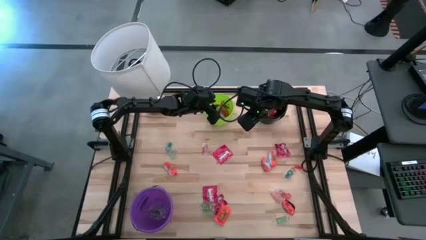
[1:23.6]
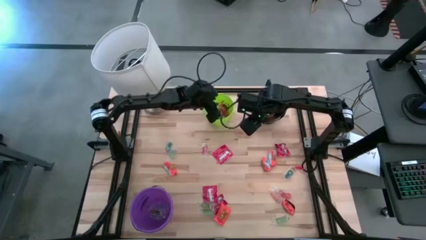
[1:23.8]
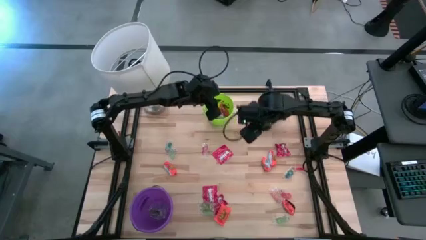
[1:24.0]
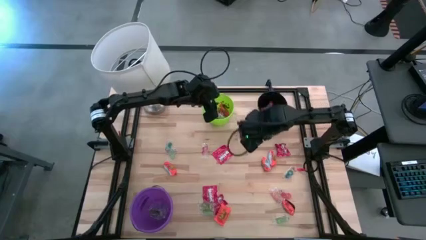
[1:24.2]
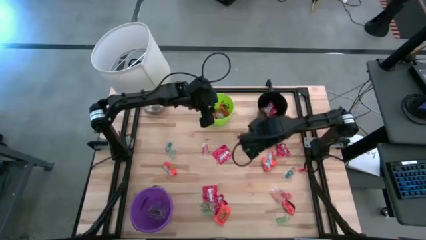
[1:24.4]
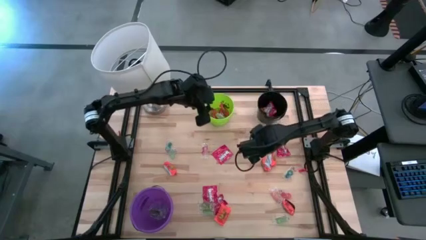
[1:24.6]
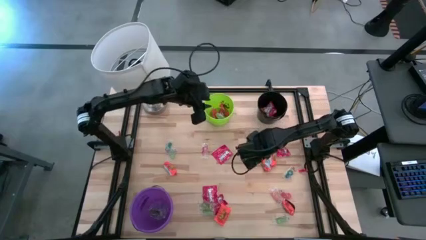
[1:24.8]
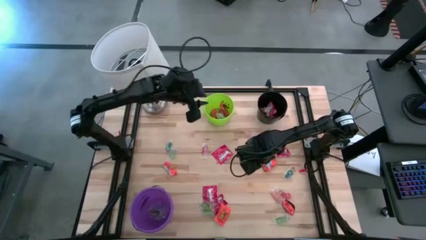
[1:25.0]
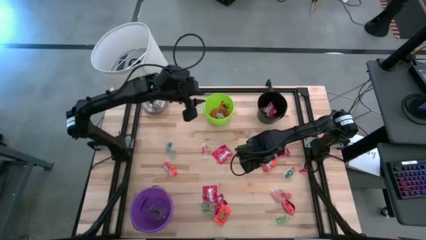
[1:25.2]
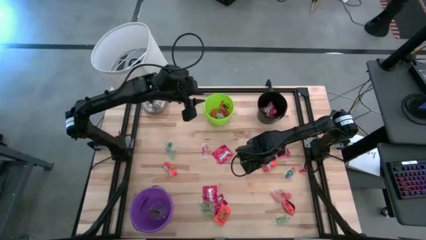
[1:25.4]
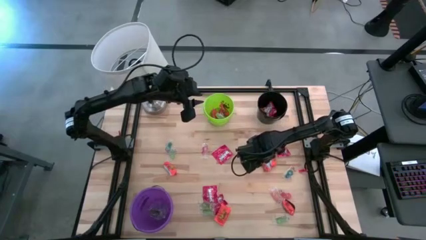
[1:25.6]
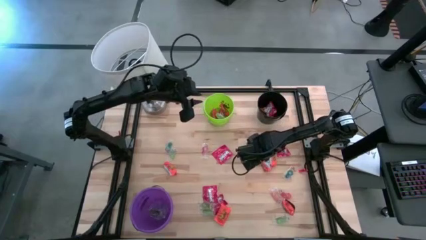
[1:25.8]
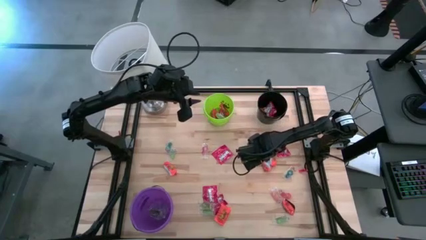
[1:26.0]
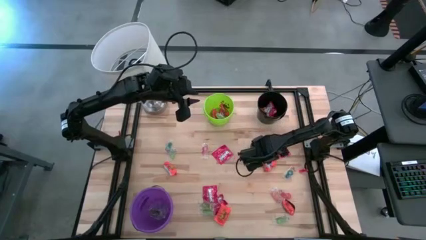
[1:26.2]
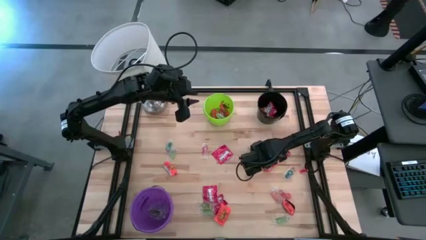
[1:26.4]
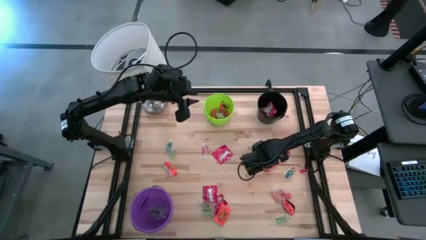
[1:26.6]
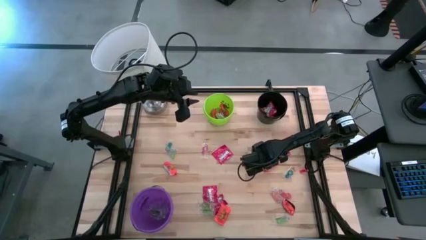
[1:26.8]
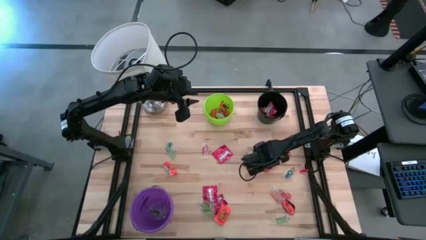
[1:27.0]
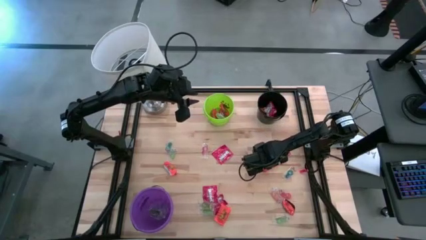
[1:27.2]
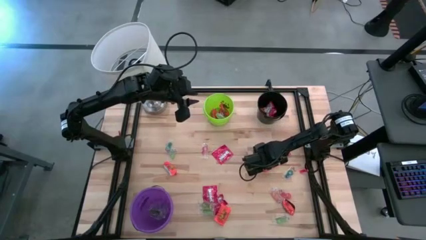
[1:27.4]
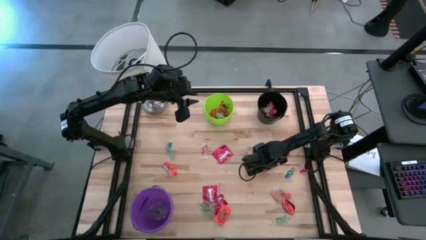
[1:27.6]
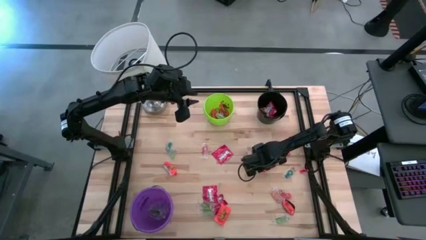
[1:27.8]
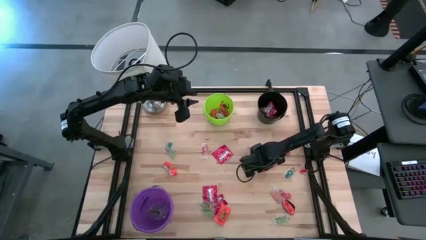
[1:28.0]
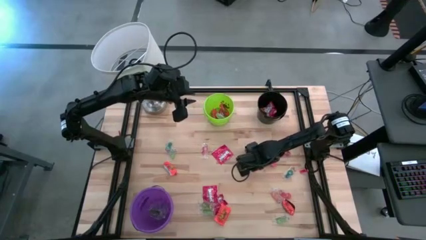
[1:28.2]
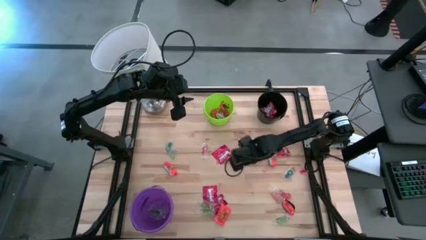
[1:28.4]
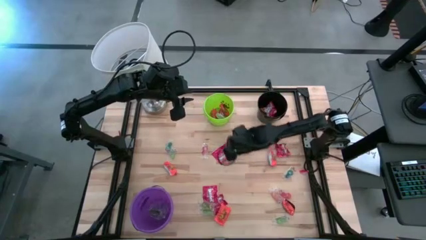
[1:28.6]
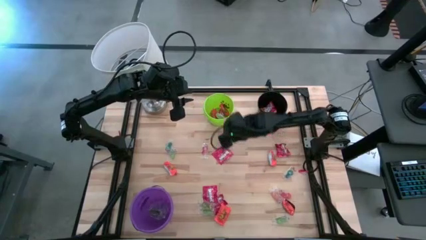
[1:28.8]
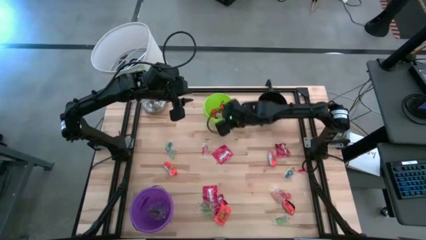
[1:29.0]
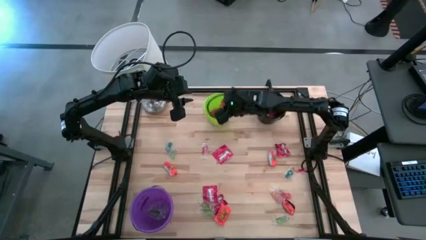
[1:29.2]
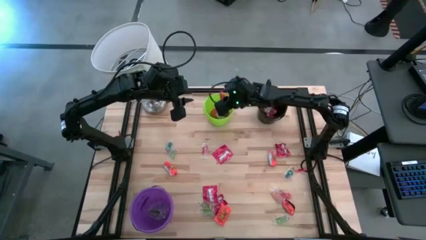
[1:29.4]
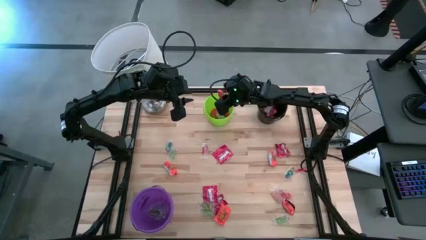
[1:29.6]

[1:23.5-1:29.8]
Task: Sort candy
Put the orange chocolate into the green bucket

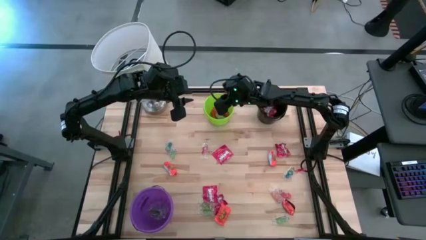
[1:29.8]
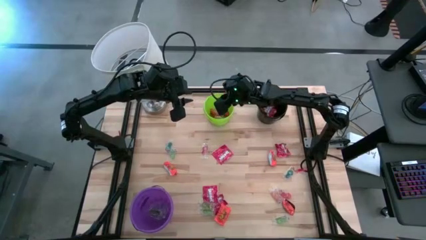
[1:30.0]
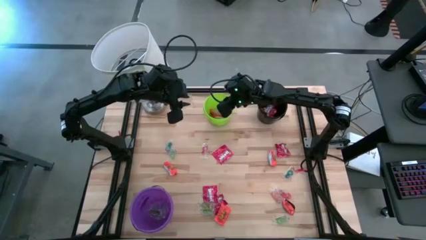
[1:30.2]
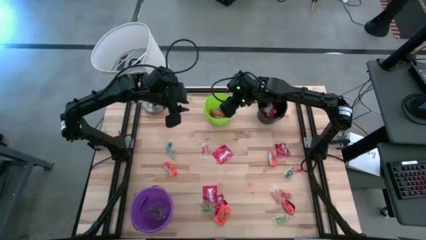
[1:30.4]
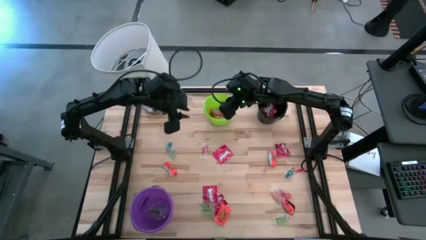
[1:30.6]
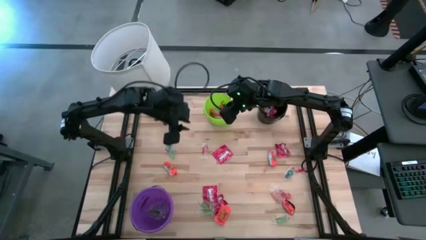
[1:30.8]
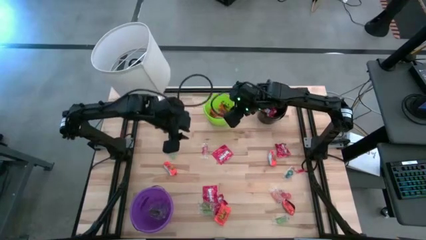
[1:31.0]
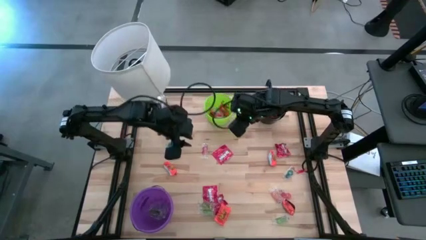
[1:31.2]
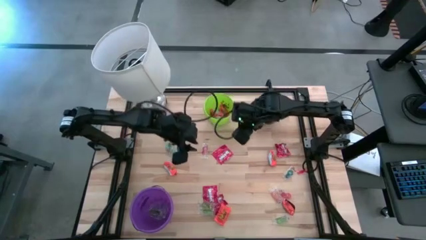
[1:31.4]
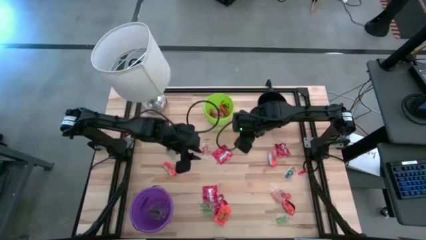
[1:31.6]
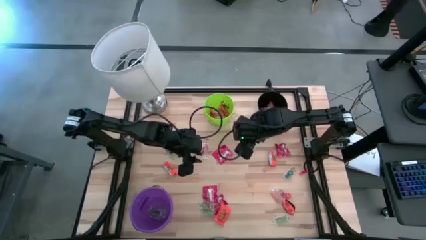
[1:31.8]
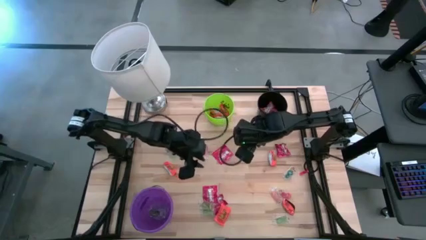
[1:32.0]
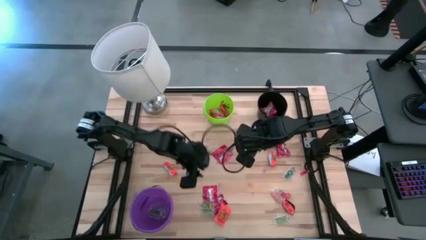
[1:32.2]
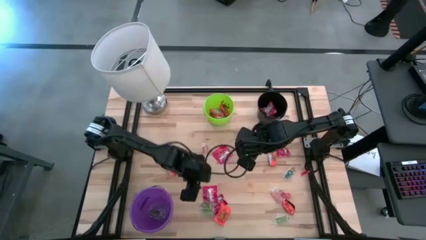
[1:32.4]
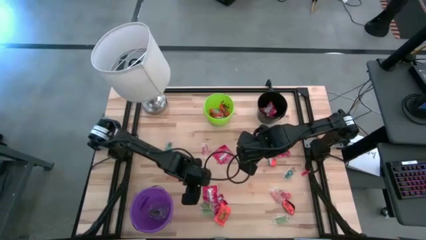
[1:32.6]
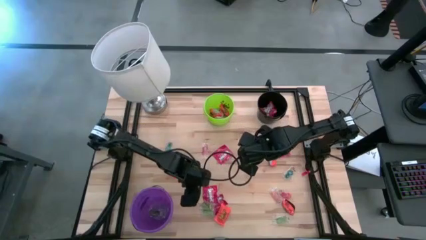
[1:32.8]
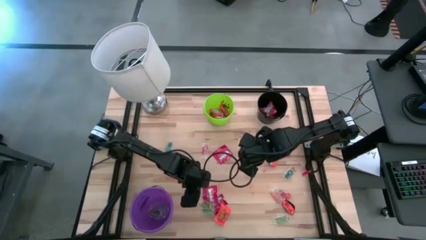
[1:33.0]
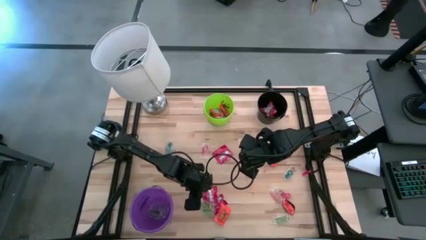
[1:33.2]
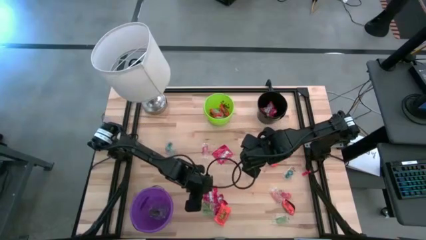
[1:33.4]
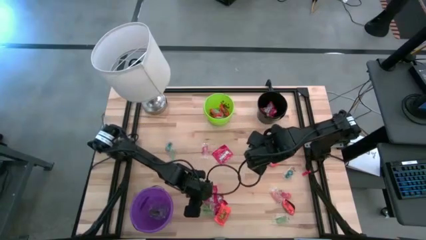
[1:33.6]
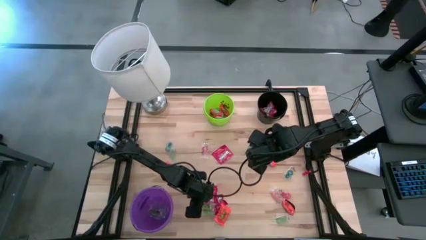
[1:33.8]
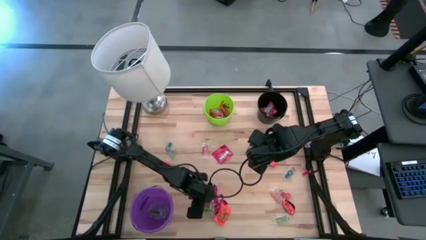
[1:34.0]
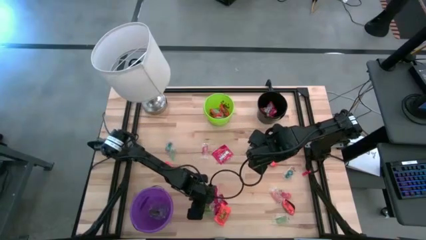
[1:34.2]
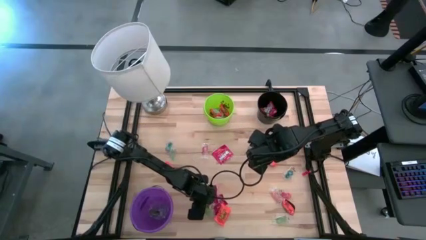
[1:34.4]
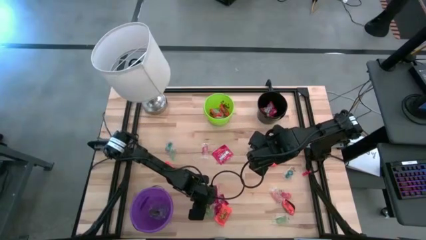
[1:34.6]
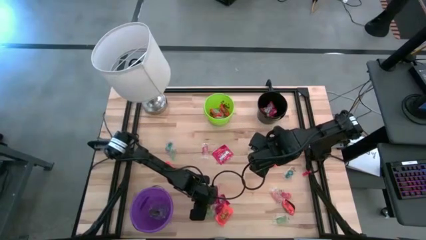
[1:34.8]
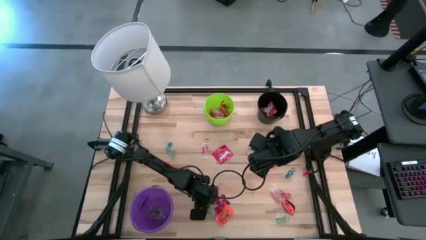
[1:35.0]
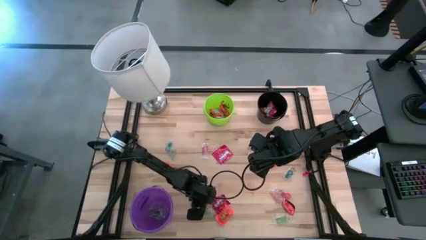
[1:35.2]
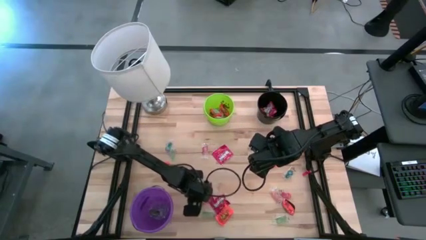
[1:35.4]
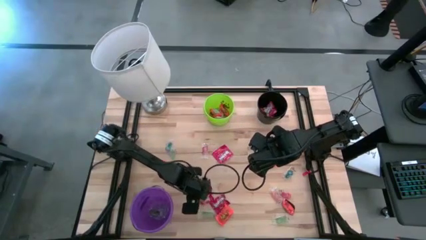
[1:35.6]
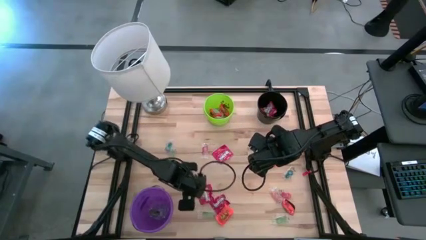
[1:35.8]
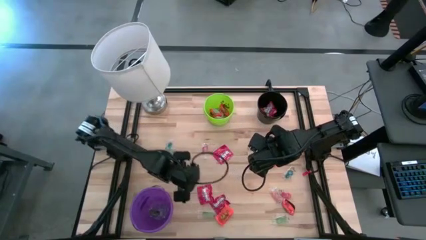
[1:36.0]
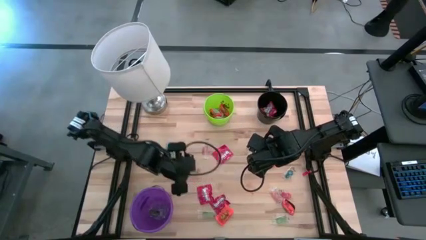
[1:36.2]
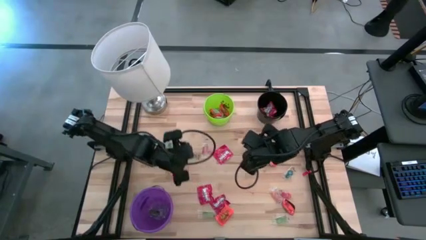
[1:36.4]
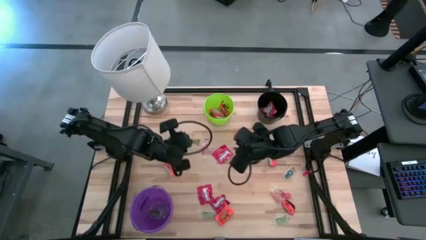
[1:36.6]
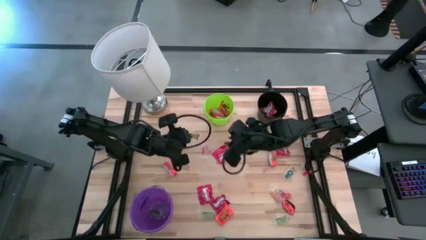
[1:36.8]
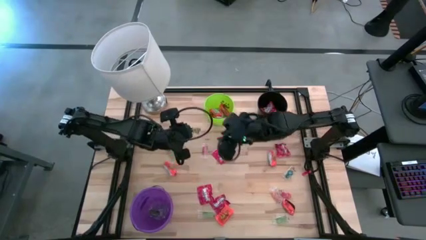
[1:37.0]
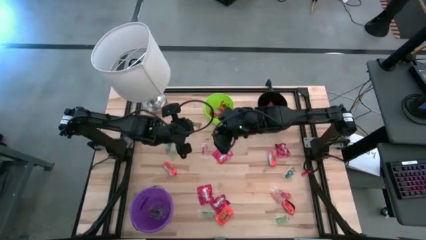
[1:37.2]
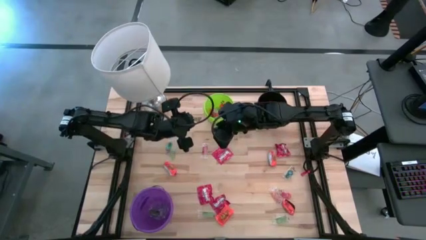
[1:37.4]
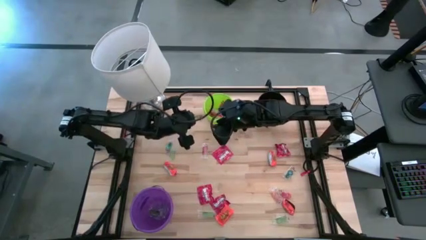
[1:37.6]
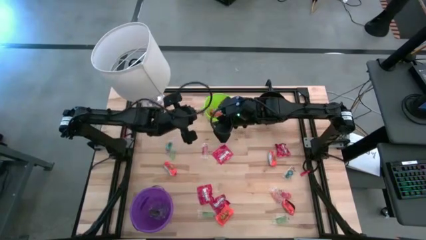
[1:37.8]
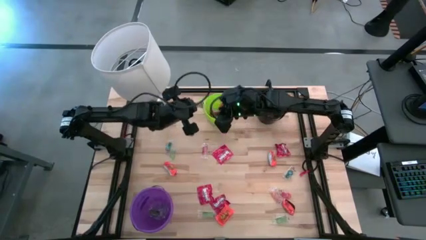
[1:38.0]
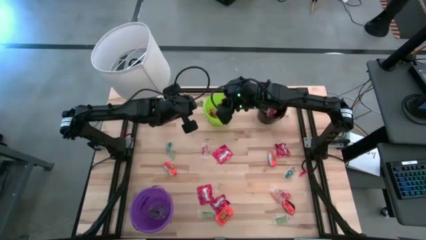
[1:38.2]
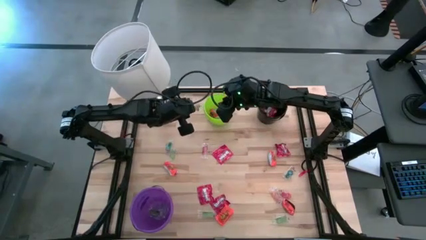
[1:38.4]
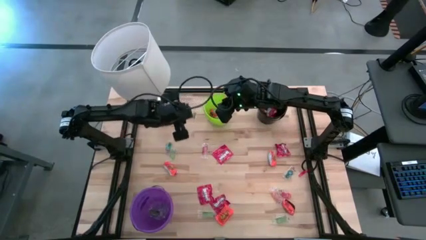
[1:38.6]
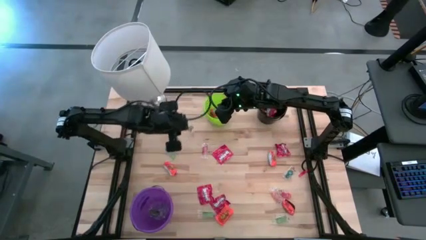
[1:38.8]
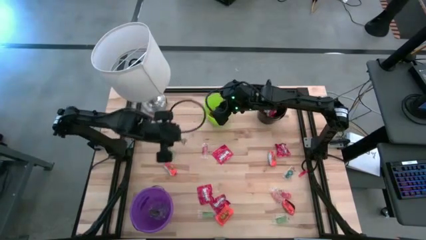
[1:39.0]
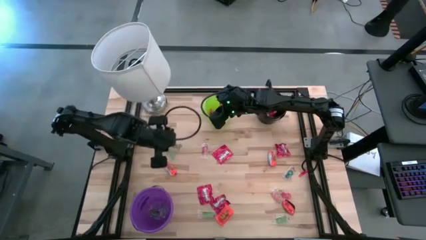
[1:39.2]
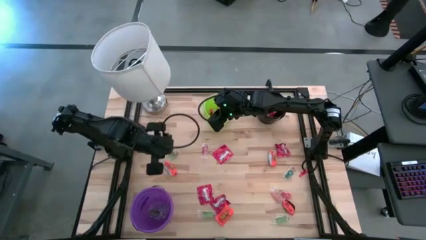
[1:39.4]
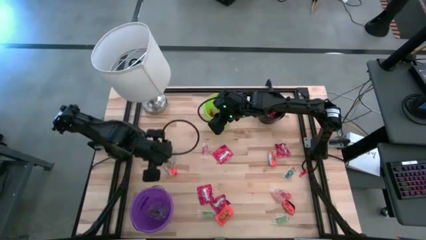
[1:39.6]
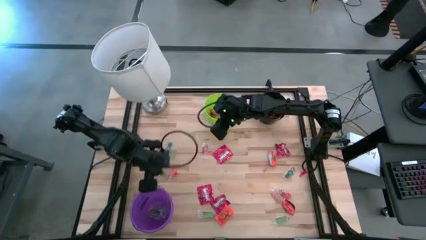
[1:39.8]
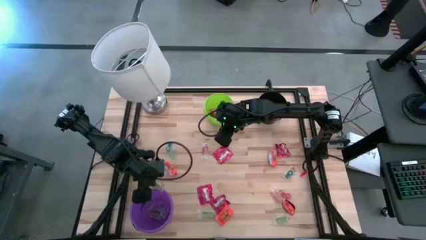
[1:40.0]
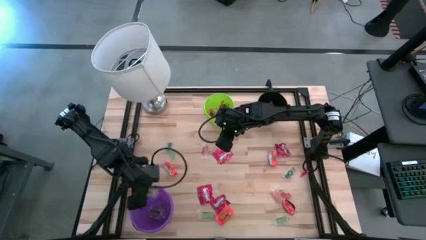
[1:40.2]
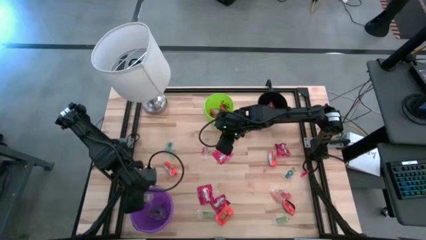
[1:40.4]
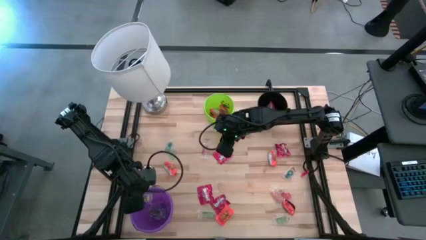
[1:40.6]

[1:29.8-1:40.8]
Put the green gummy into the violet bucket
